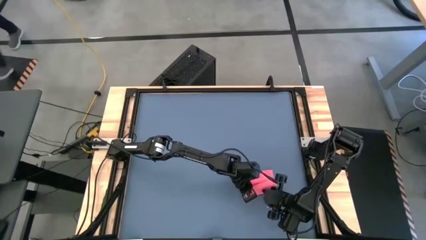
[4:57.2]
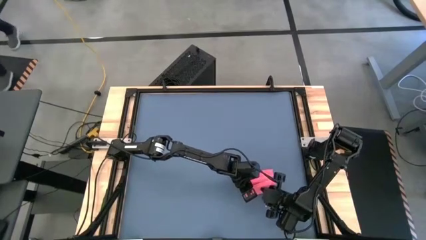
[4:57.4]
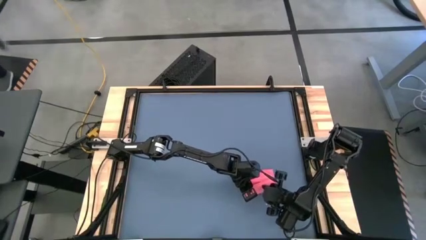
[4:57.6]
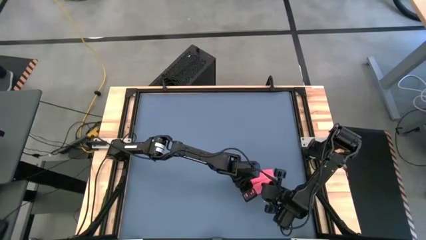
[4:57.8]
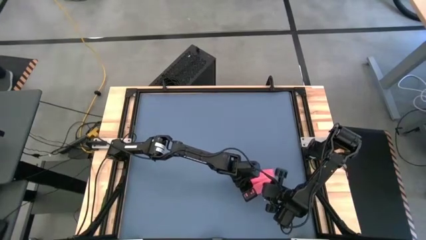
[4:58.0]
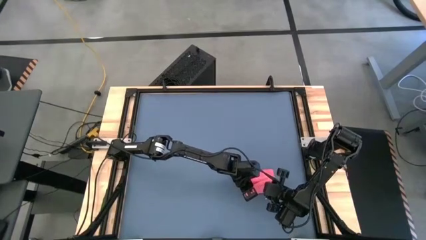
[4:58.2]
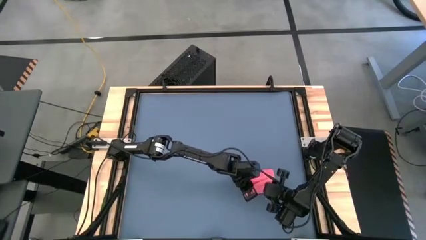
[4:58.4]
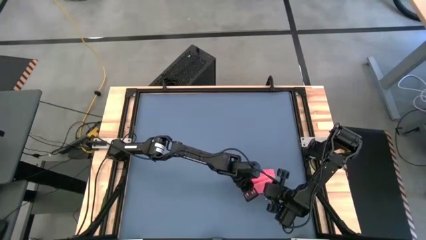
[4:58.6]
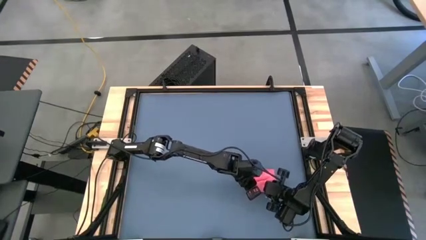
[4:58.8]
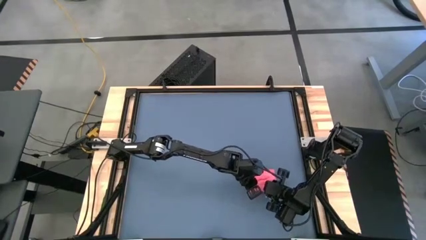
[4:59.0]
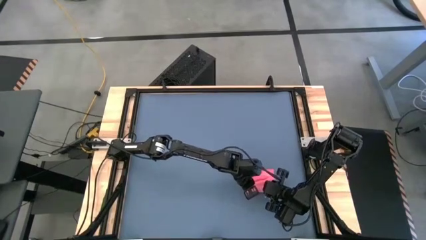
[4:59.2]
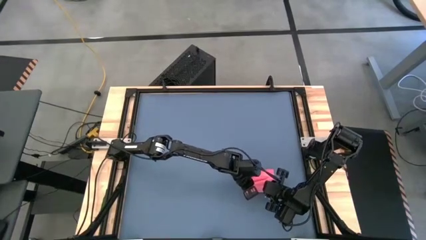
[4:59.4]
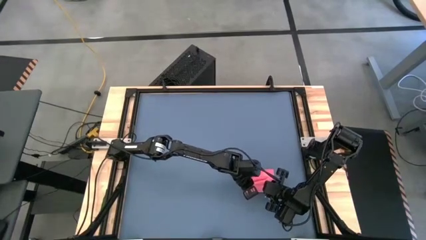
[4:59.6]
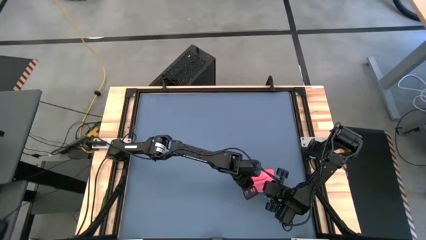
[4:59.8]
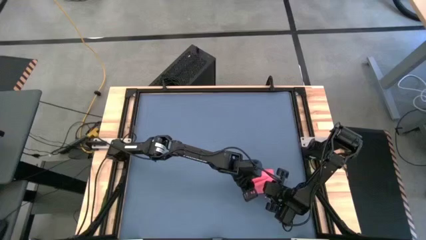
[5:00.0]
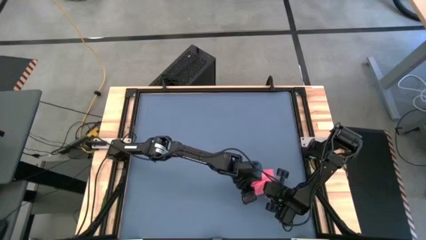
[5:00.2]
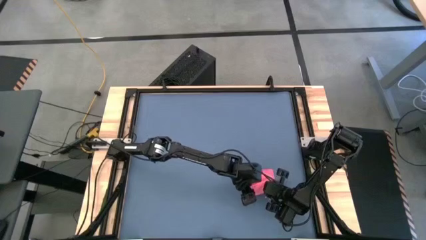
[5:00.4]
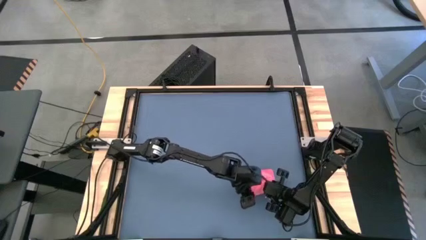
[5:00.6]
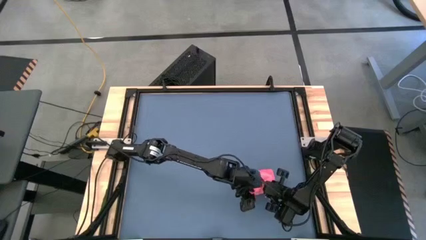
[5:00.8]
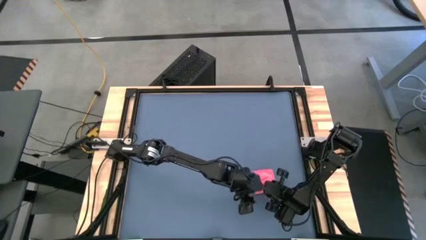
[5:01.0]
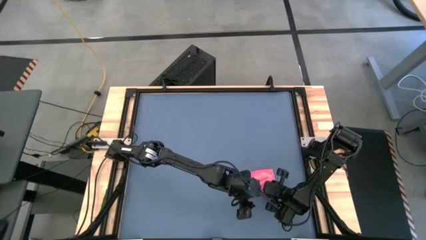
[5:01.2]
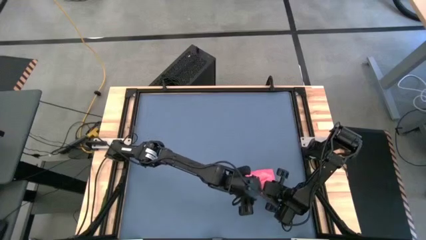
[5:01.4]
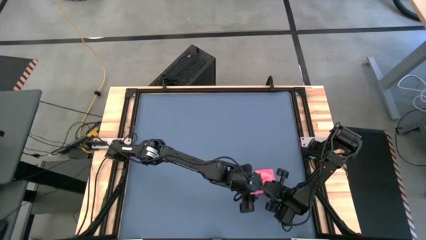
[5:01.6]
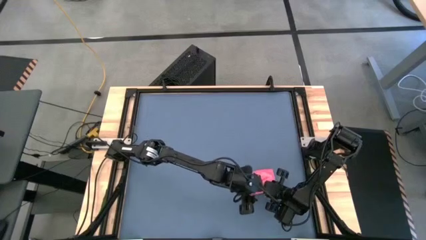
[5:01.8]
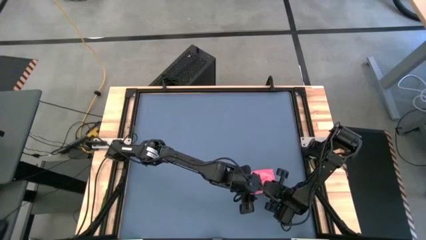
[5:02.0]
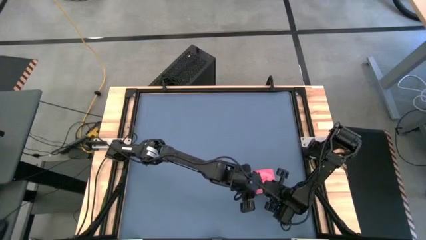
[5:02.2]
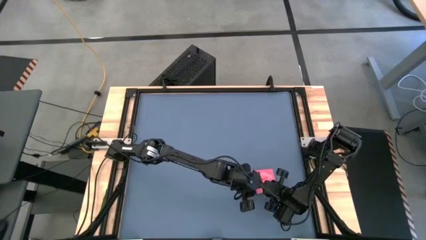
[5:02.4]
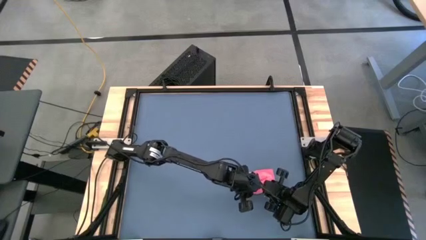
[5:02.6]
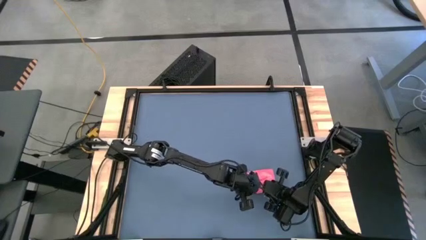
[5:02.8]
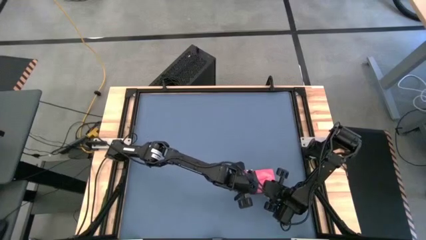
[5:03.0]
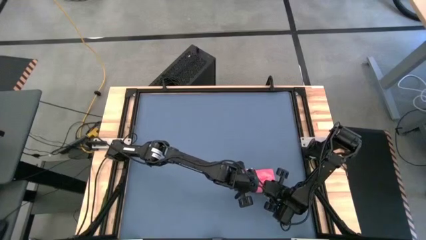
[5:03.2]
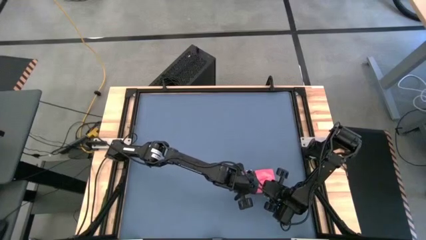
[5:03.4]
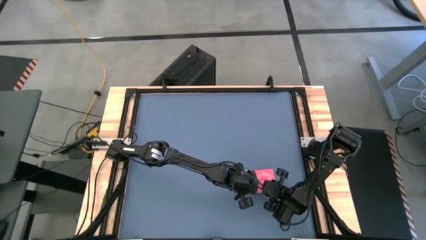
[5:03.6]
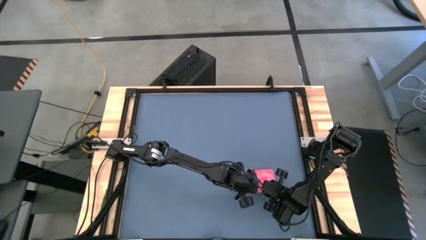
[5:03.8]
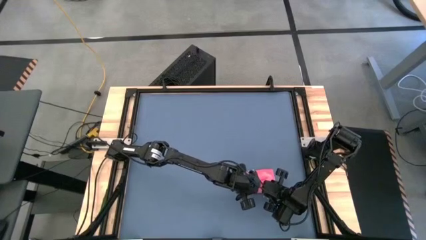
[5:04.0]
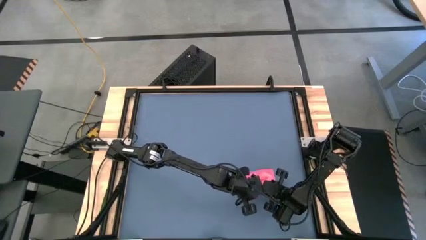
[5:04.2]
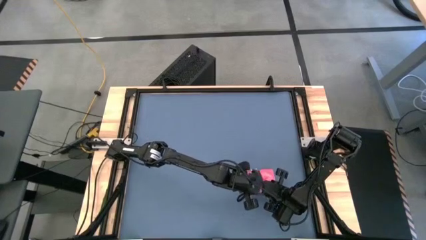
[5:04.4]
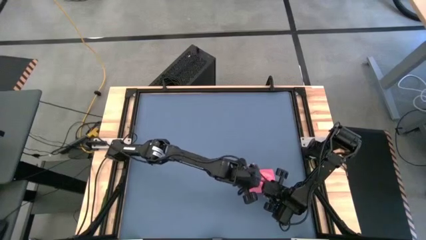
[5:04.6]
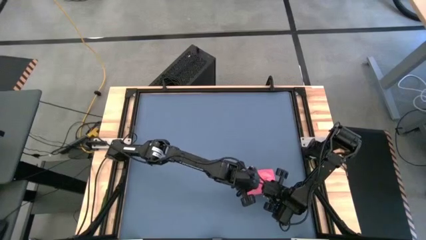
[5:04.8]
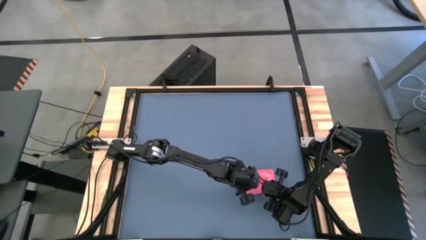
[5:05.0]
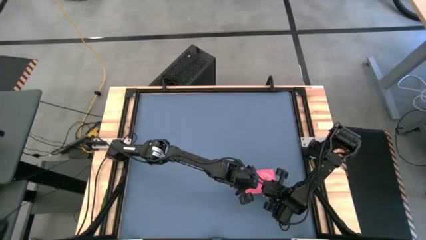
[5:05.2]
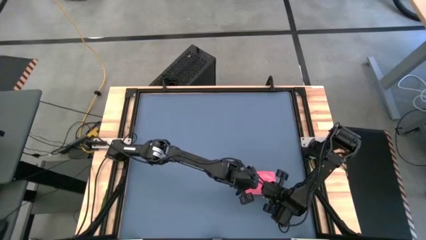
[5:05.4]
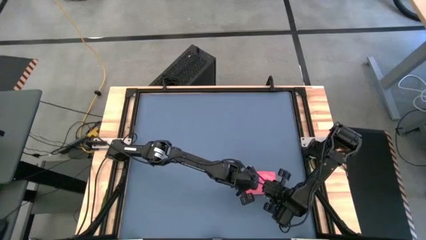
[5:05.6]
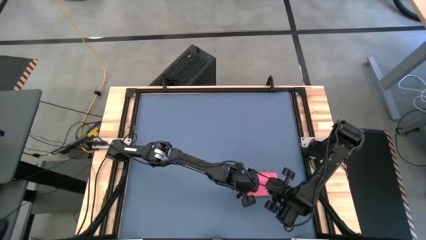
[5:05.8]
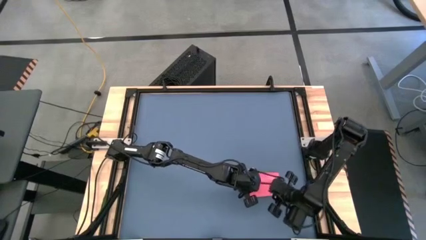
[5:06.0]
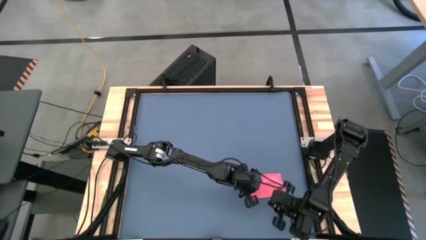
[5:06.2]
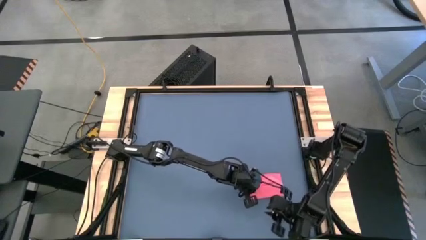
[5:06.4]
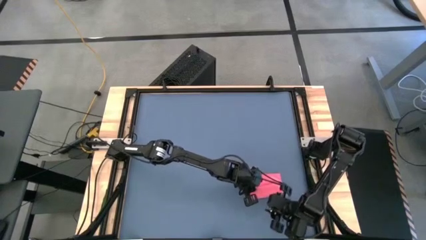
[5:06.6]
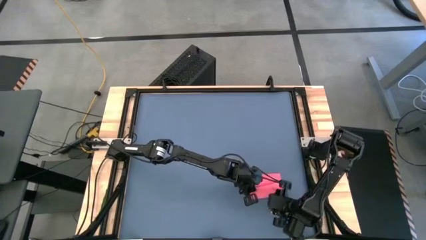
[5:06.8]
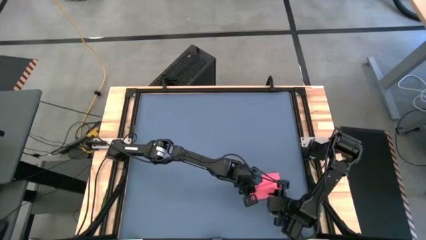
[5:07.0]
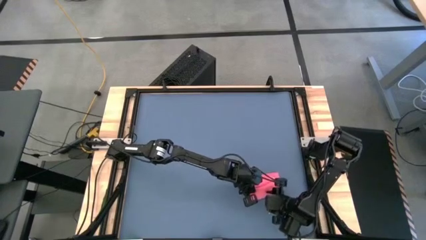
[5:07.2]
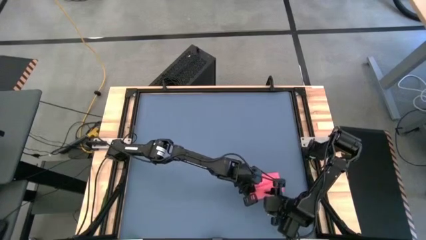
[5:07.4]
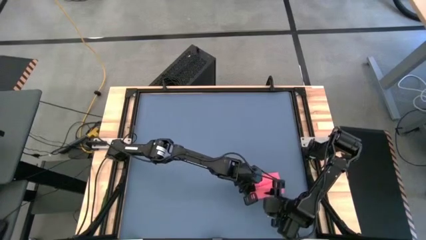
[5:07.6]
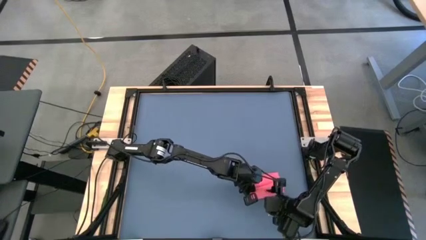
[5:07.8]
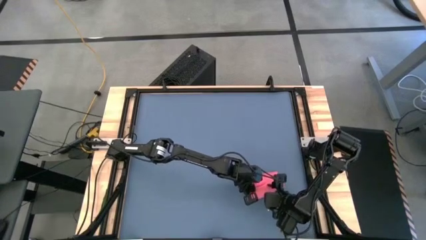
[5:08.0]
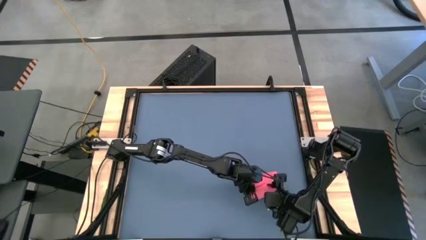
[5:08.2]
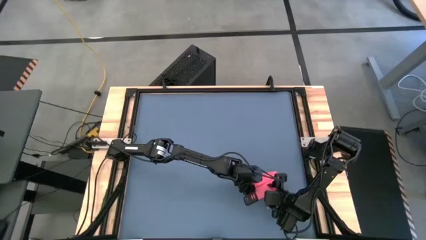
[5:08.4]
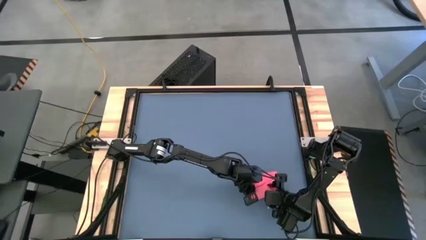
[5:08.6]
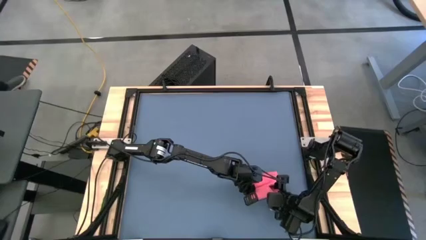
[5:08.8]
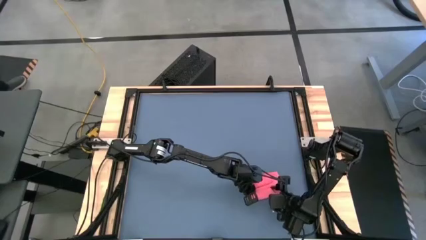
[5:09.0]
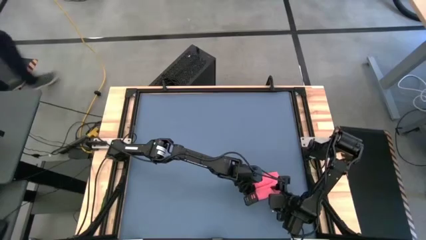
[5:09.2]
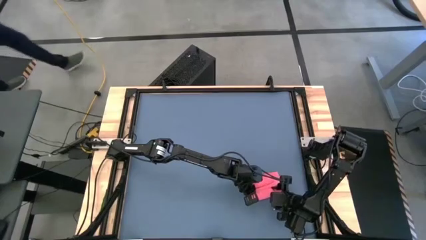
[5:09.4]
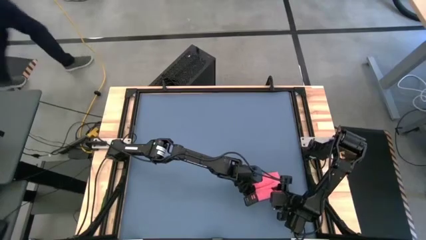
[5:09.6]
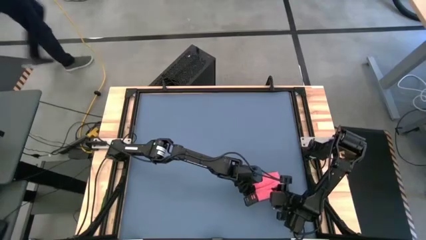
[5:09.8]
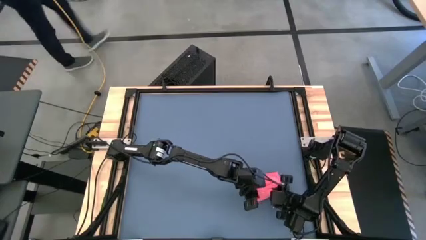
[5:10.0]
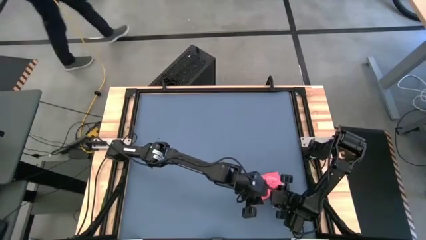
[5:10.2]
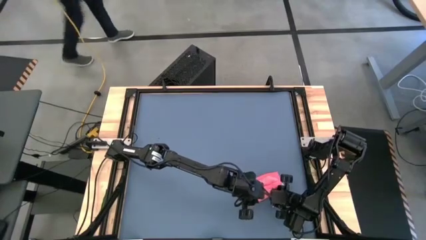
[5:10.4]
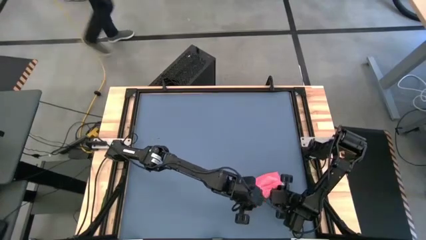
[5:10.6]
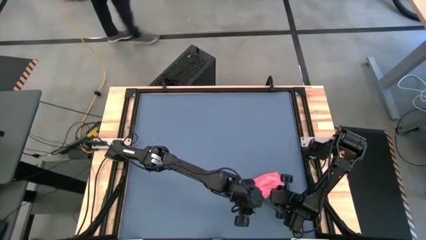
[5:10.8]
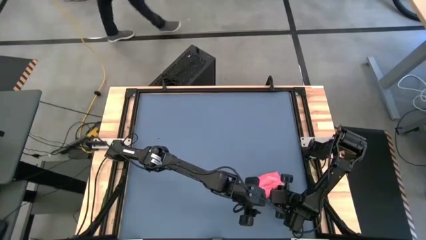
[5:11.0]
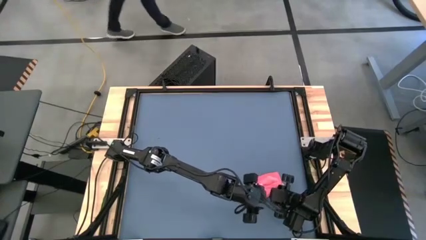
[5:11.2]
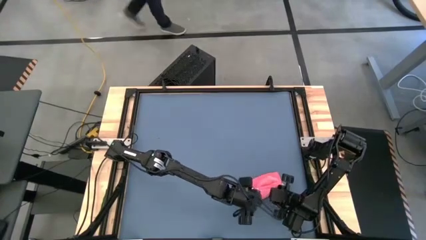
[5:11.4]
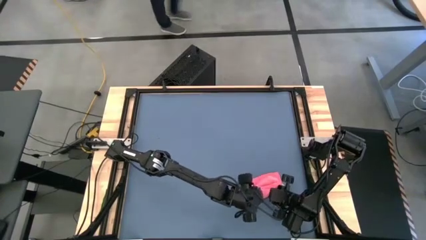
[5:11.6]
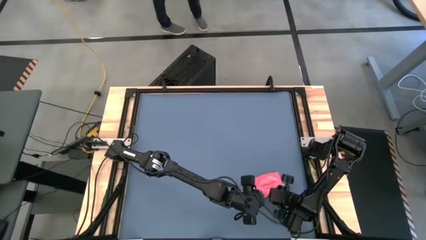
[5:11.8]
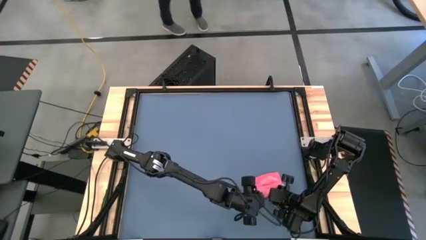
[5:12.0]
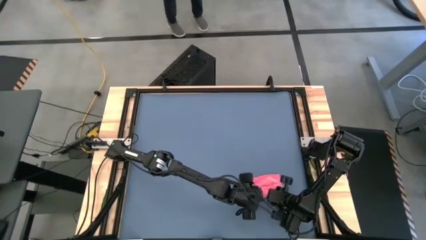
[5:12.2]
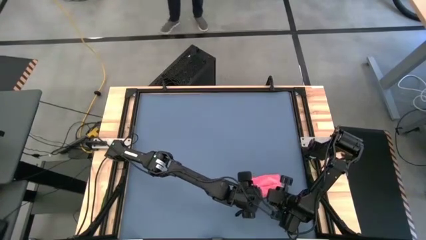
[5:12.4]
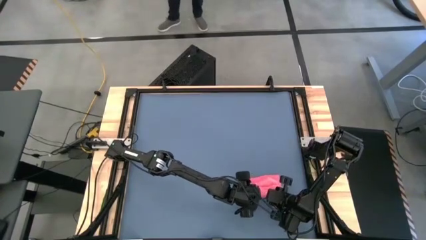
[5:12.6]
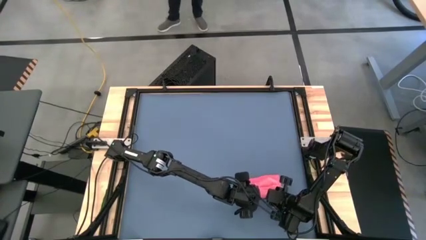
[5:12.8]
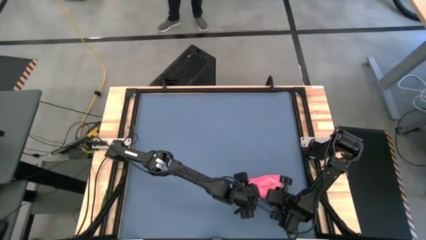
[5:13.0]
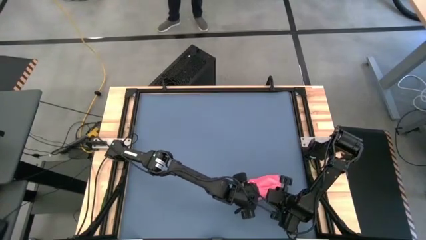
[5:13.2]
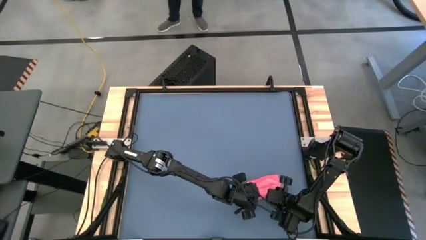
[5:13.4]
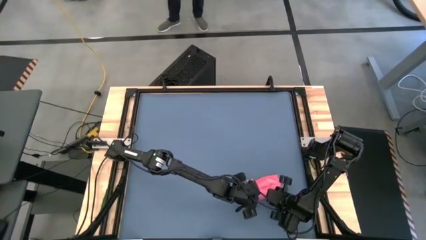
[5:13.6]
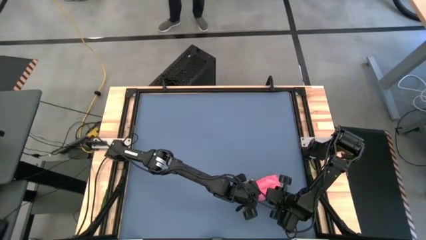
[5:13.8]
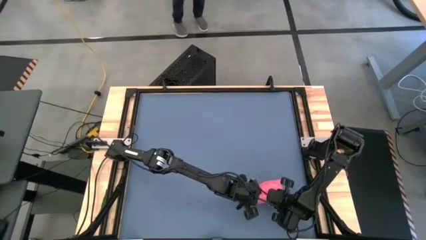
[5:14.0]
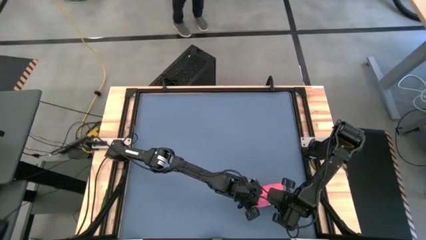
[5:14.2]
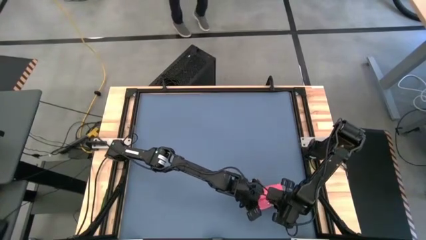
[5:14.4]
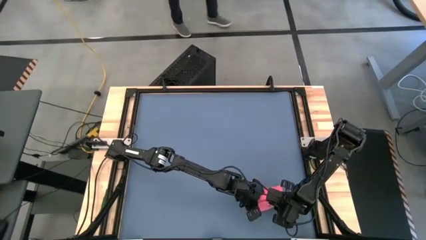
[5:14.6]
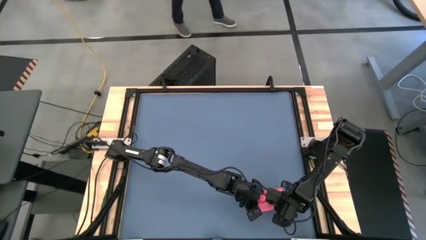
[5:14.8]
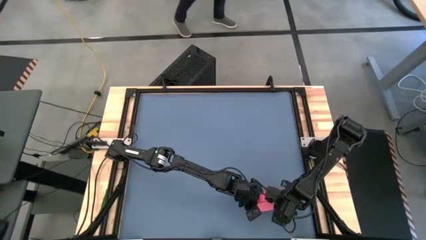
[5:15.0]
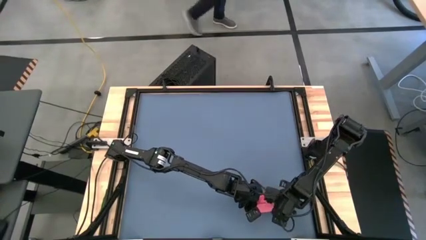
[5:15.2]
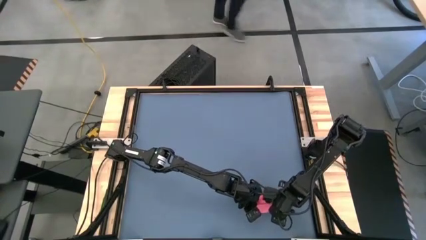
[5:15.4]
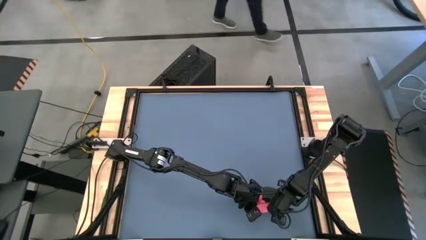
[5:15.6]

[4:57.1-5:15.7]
Task: Roll towel
Roll the pink towel
